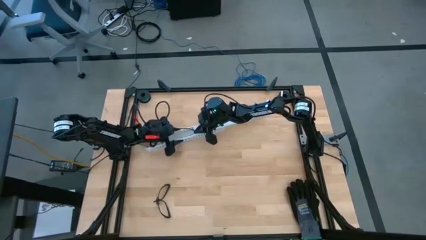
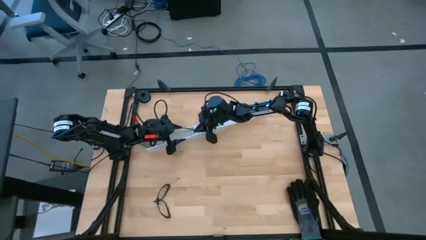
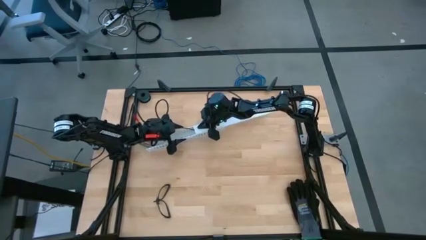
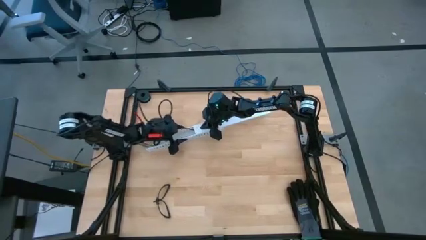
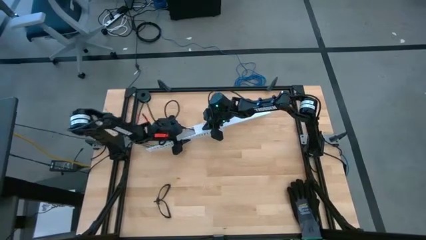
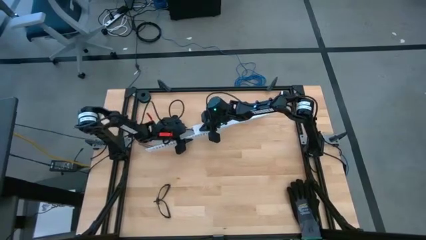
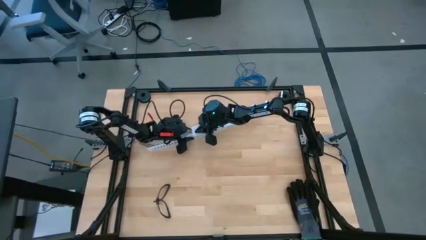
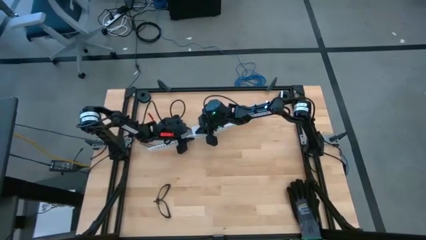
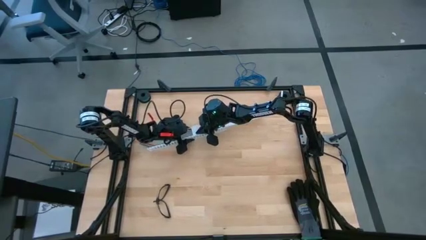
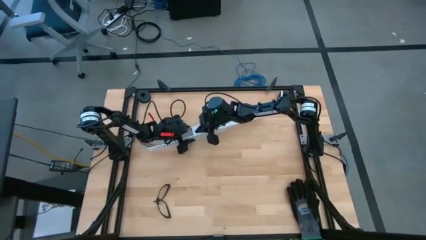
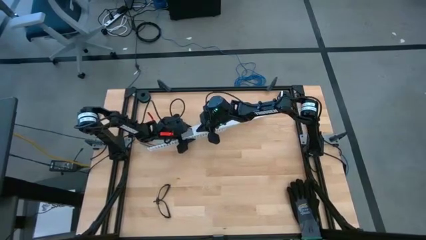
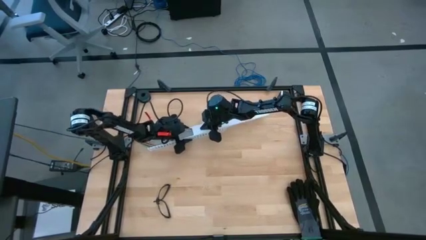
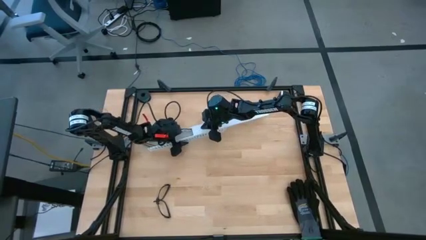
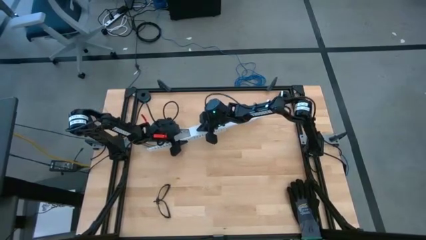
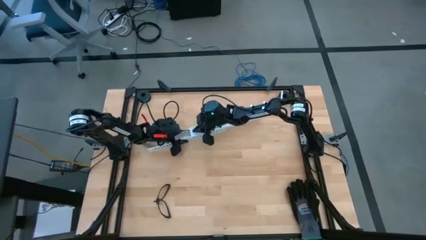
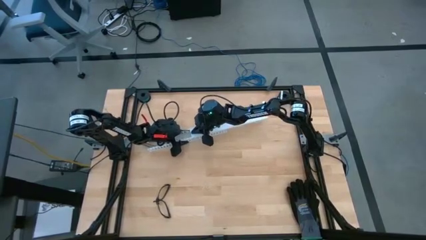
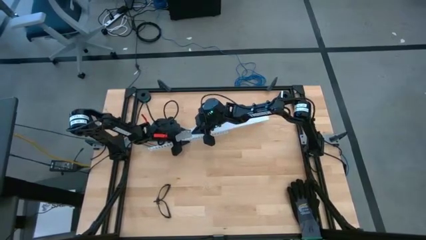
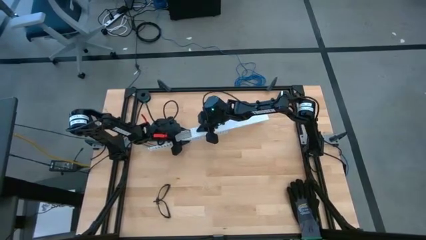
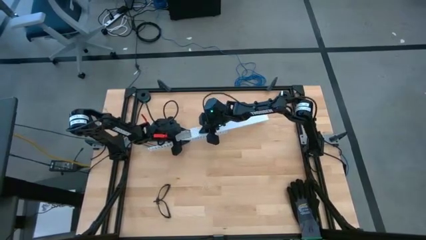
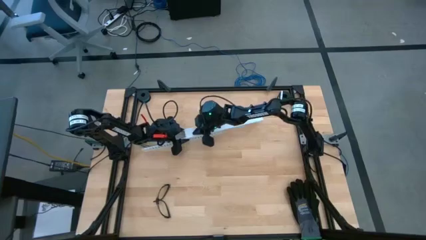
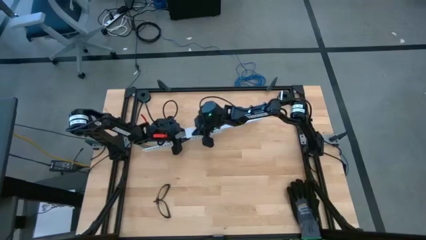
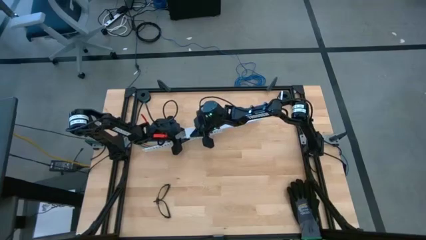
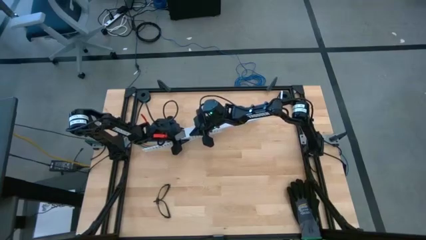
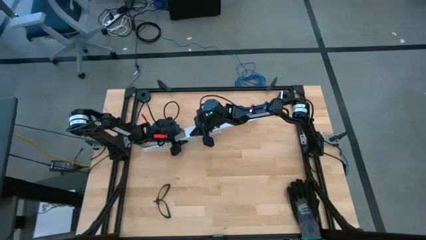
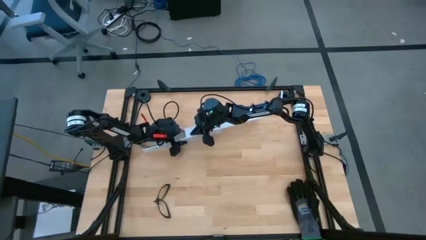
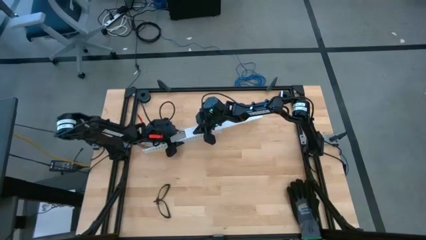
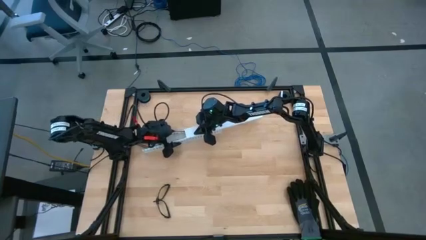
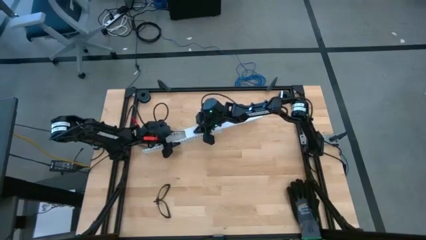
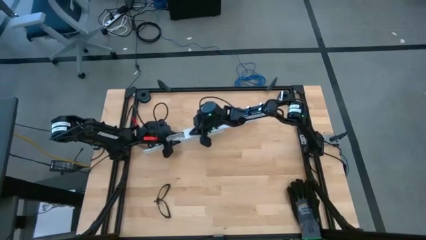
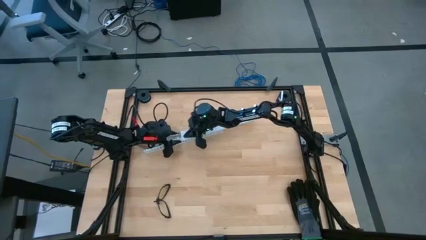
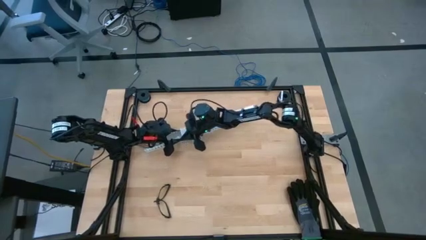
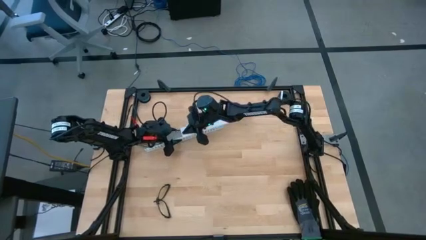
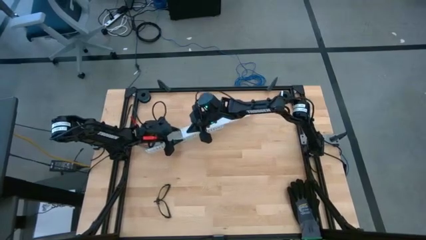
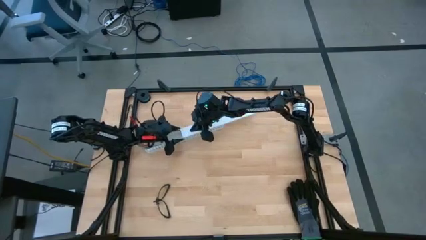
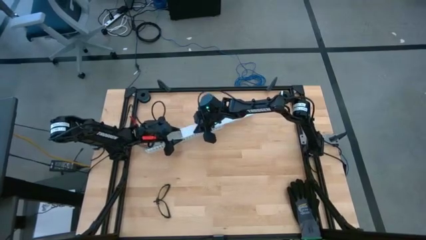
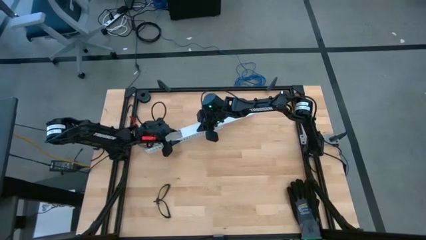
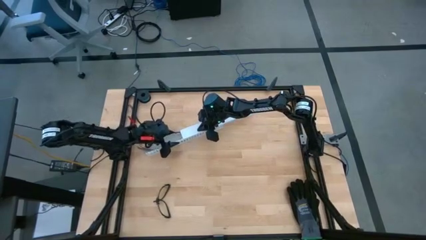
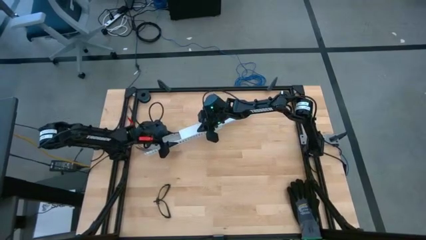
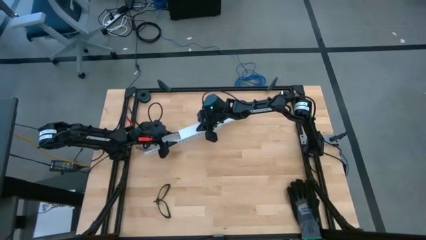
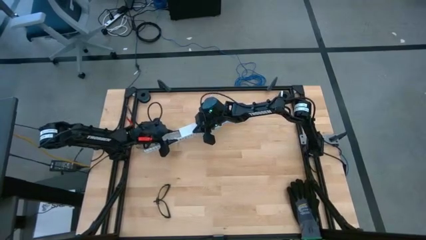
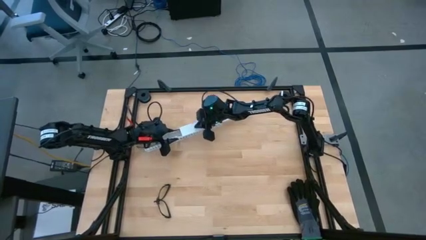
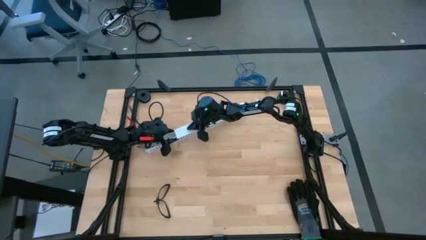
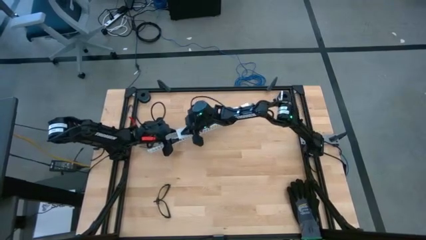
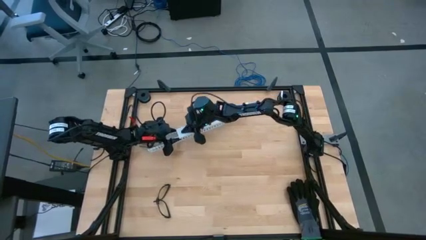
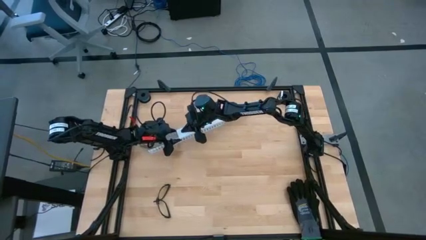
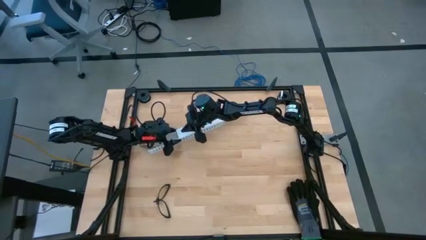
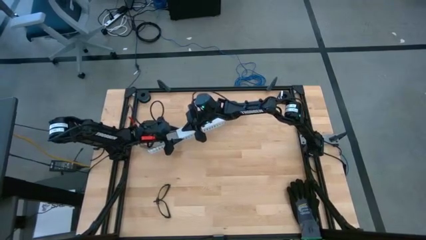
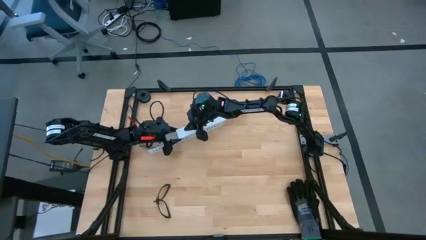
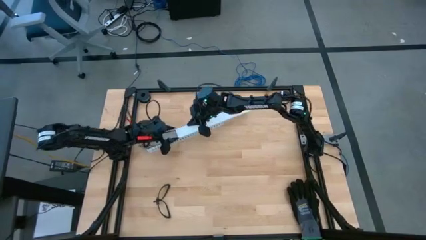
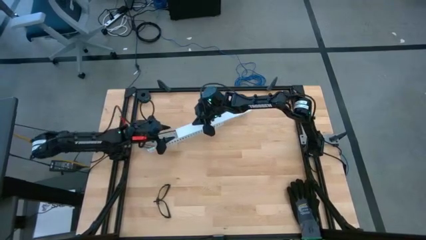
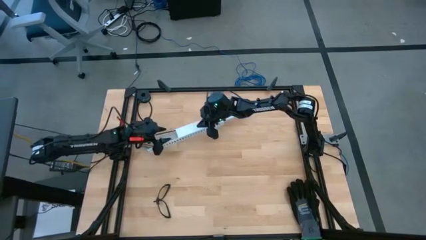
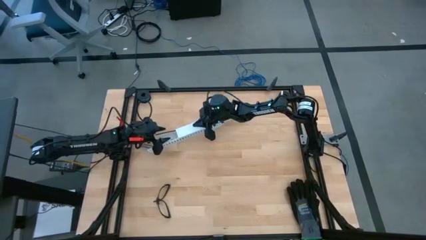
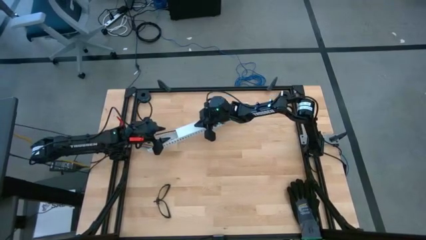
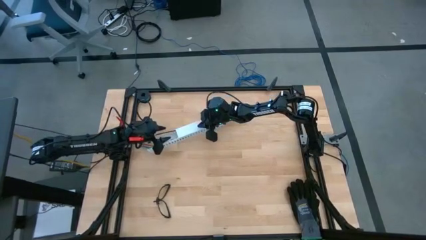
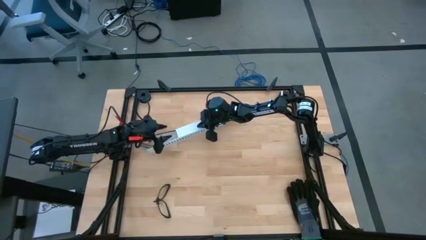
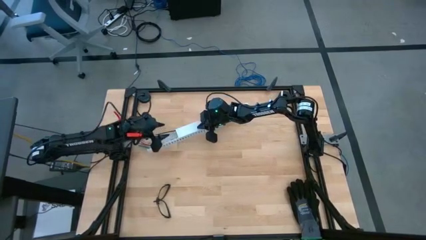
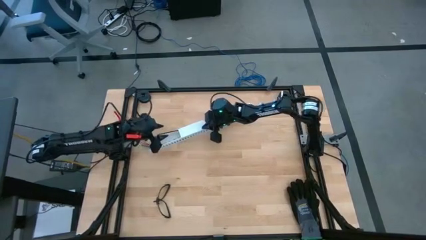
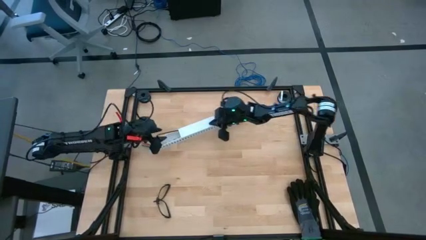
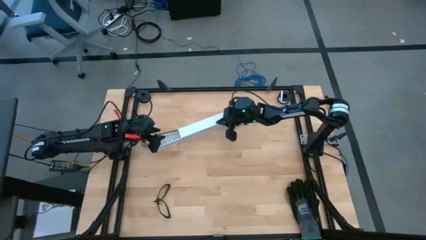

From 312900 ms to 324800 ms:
Task: Ziptie cables
Close the white cable duct lid

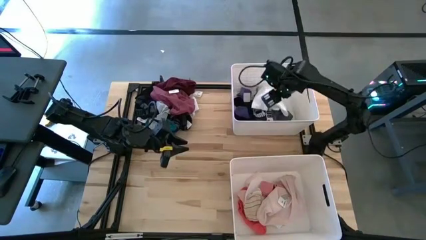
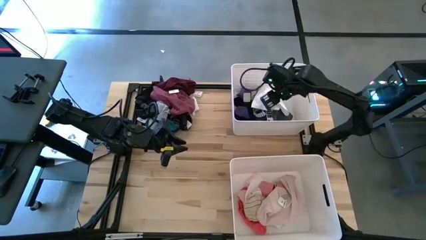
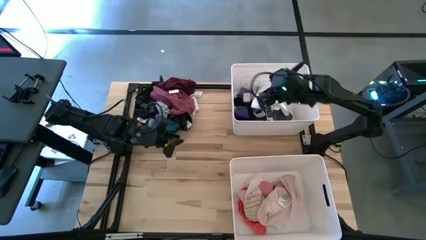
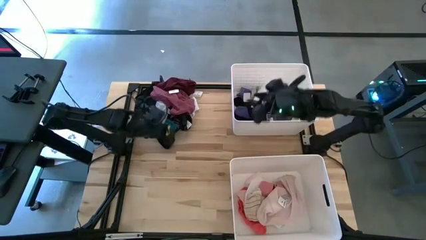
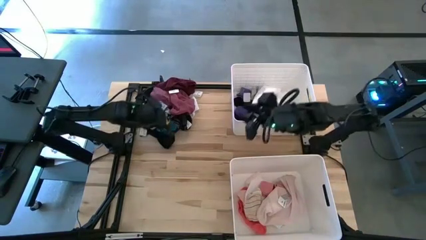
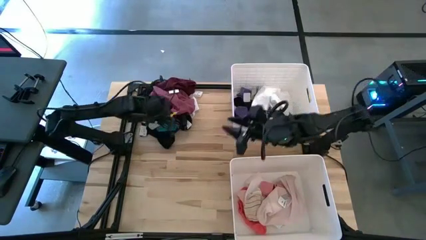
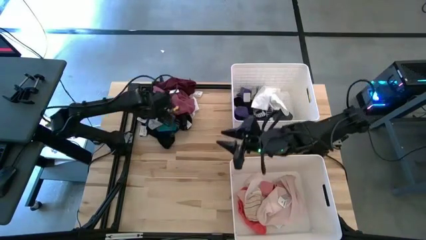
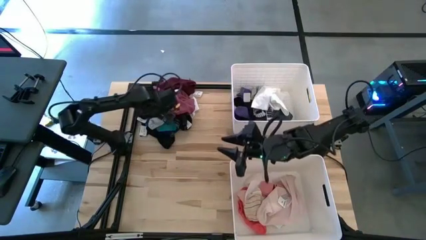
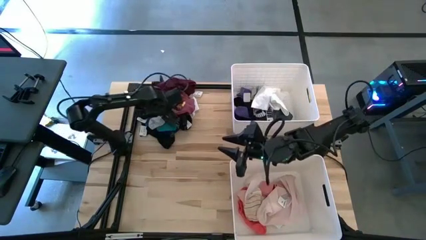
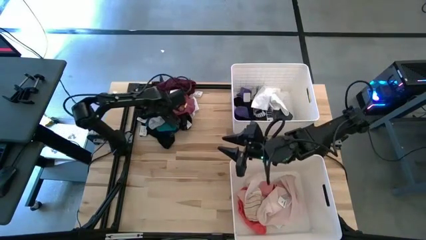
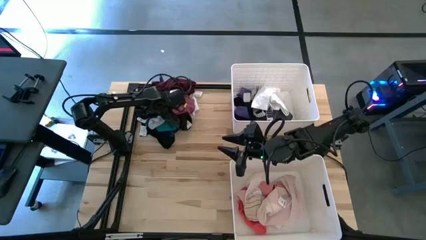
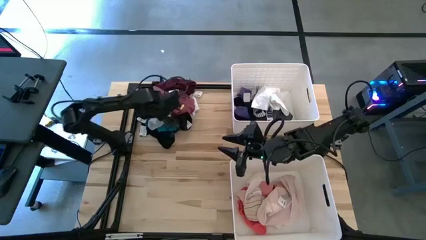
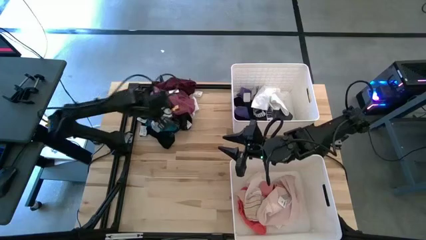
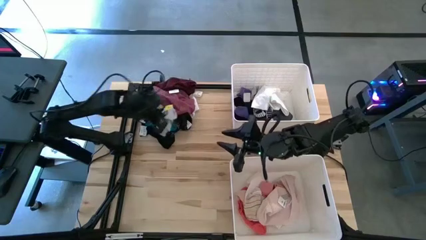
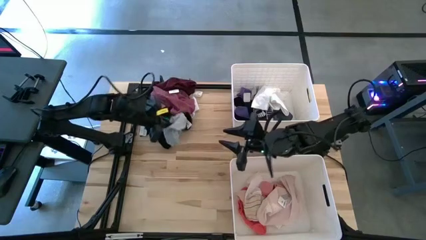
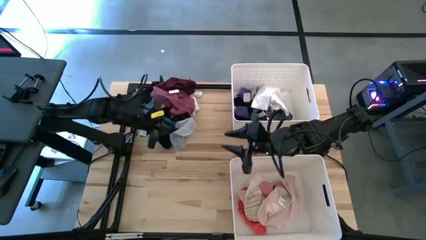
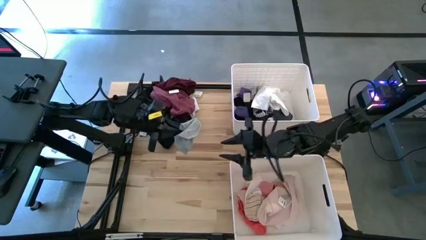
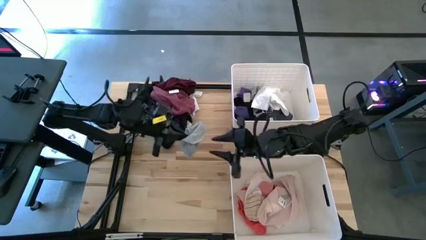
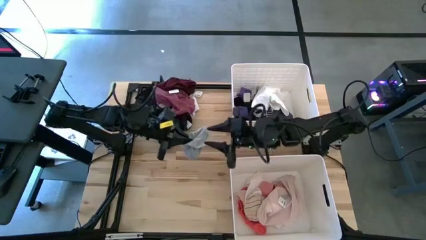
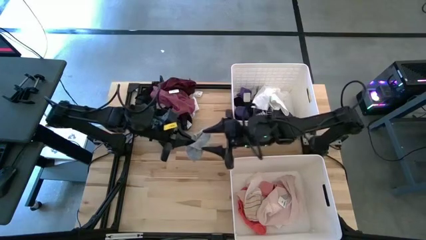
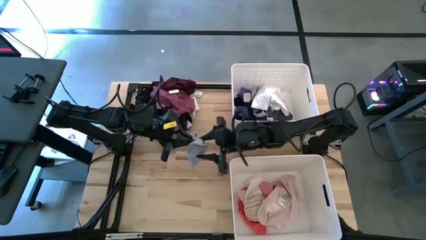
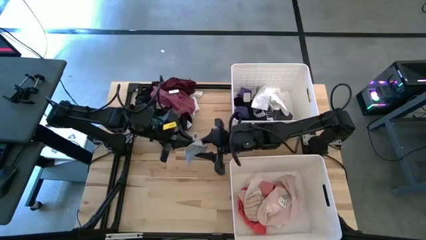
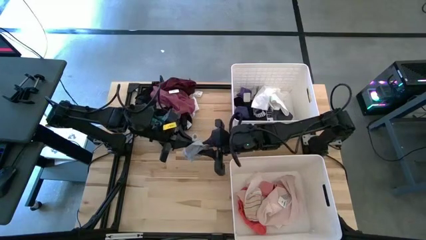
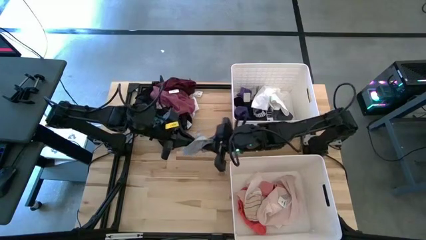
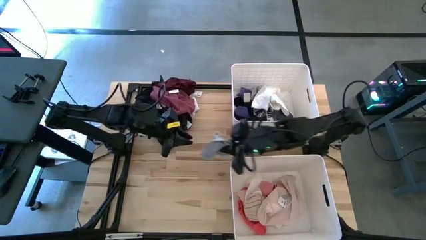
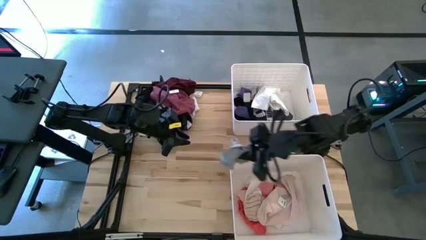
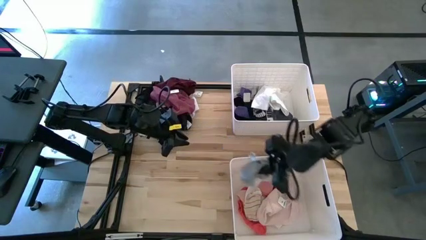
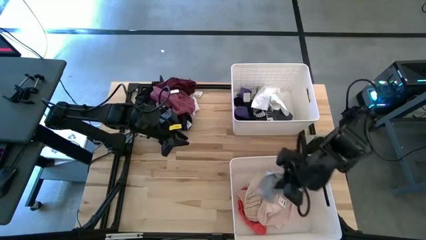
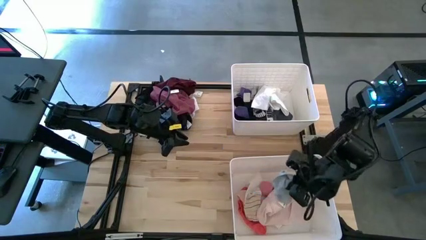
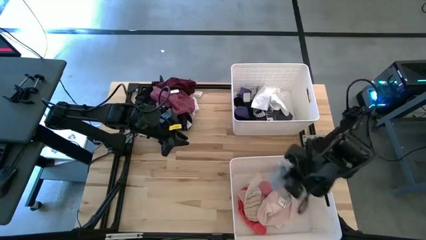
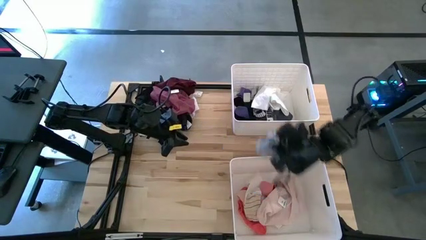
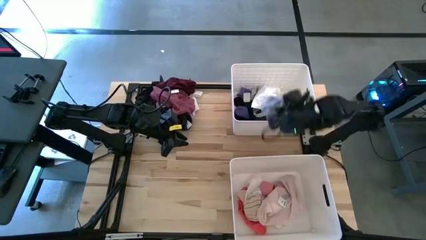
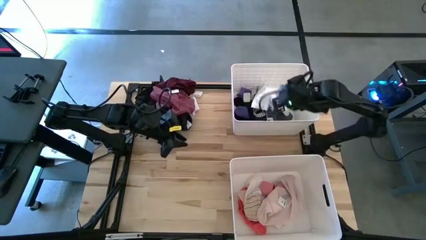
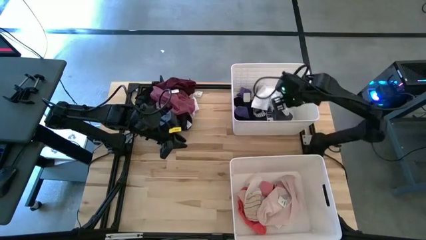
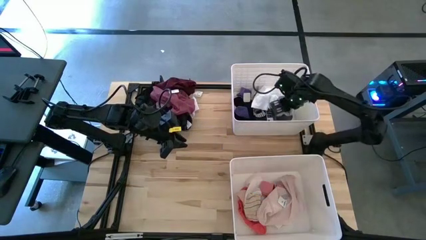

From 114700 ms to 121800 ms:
Task: Sort clothes
Put the grey sock into the top bin
